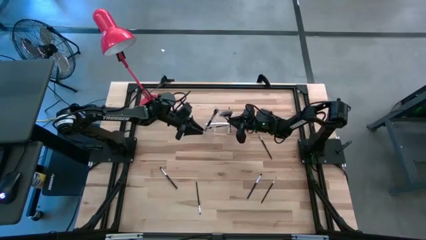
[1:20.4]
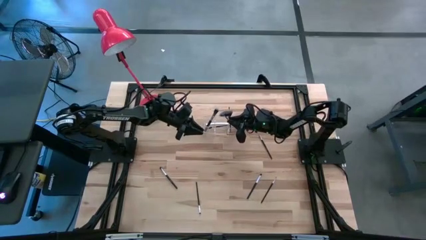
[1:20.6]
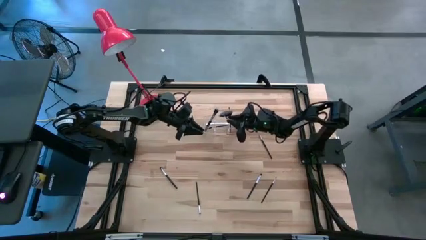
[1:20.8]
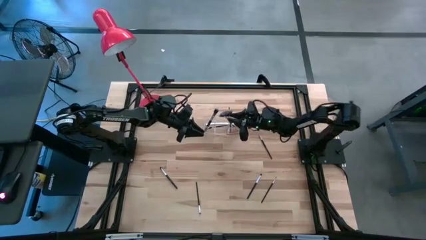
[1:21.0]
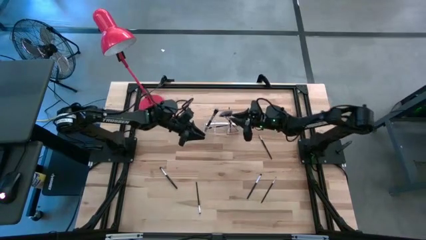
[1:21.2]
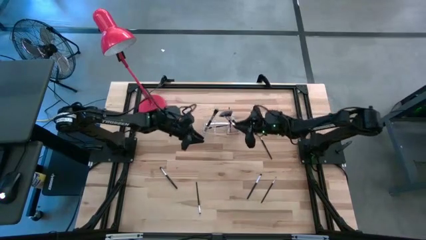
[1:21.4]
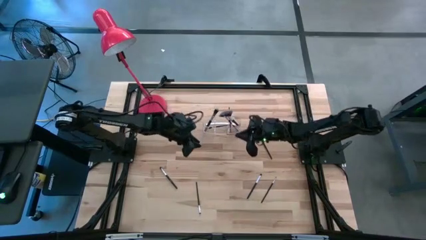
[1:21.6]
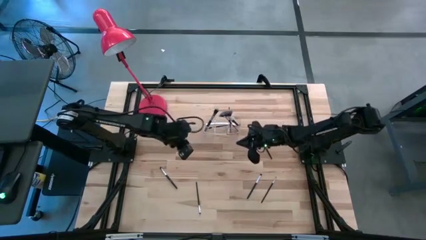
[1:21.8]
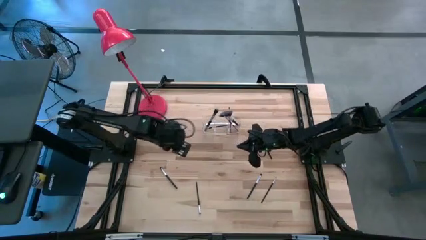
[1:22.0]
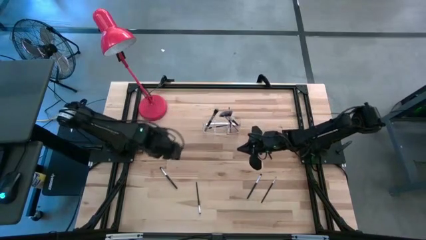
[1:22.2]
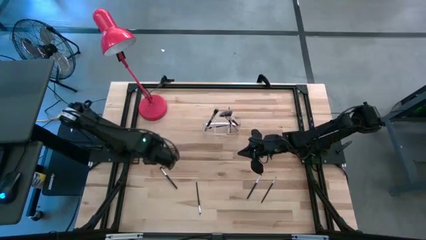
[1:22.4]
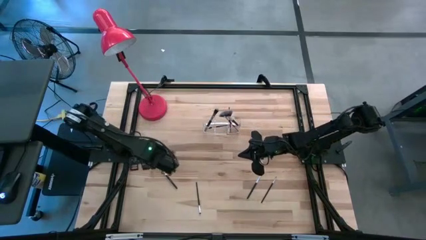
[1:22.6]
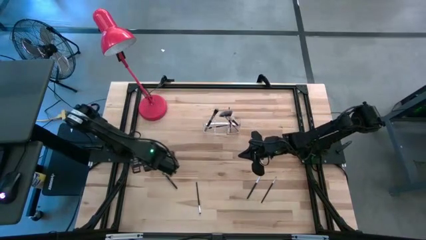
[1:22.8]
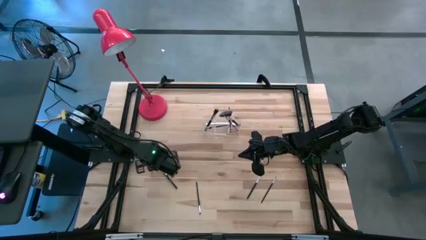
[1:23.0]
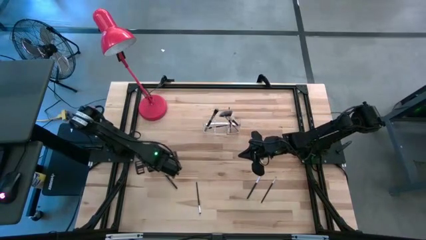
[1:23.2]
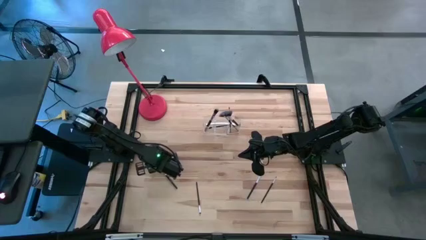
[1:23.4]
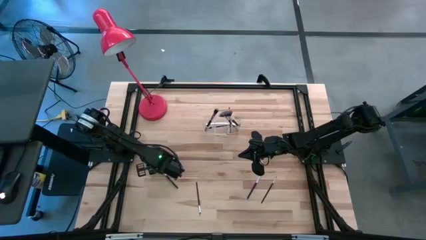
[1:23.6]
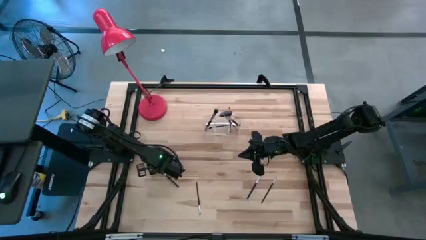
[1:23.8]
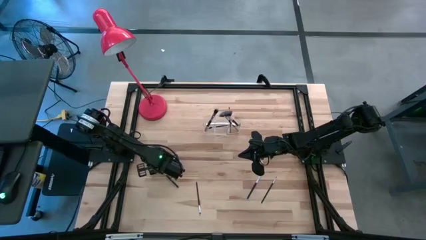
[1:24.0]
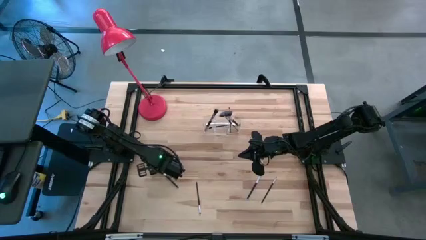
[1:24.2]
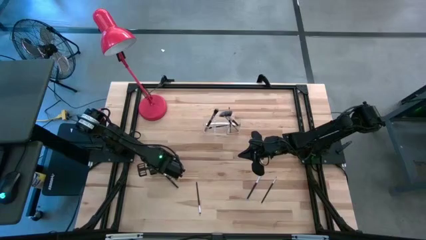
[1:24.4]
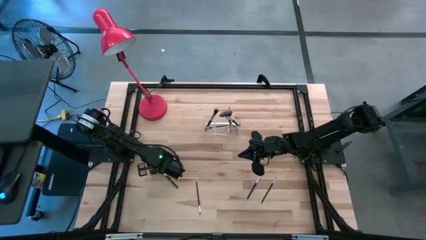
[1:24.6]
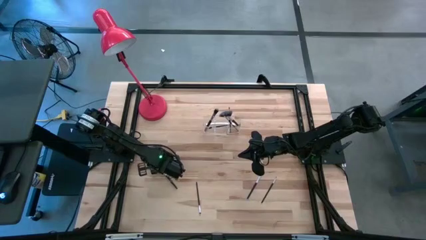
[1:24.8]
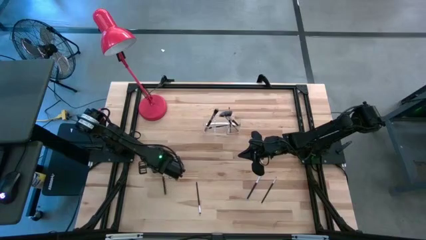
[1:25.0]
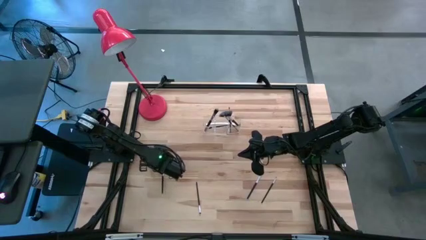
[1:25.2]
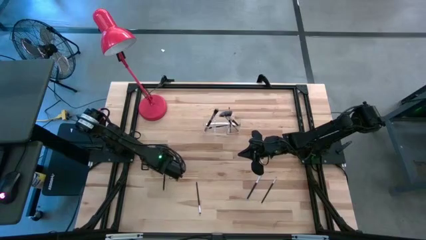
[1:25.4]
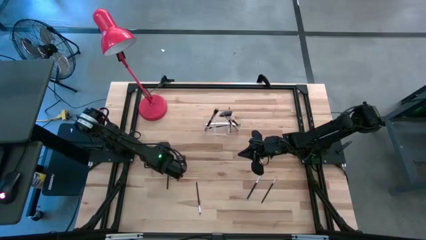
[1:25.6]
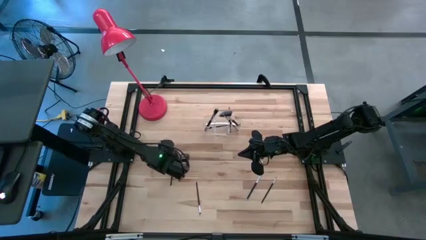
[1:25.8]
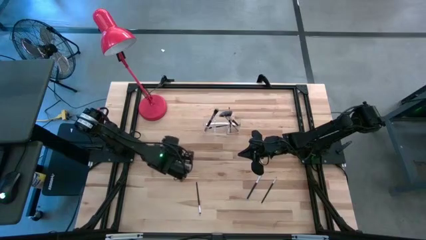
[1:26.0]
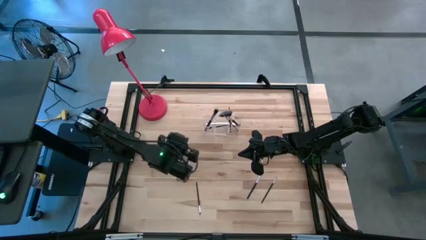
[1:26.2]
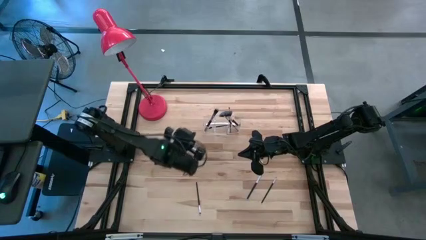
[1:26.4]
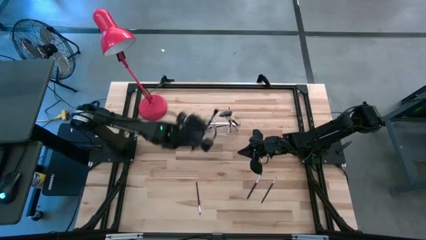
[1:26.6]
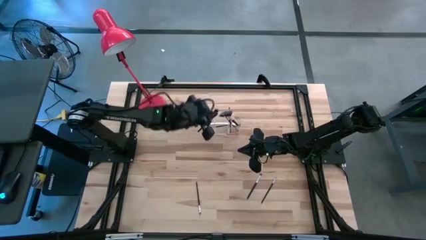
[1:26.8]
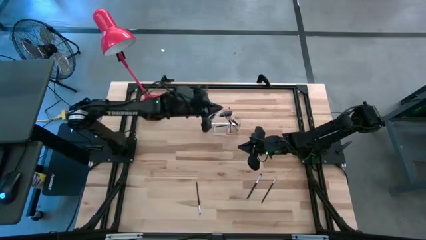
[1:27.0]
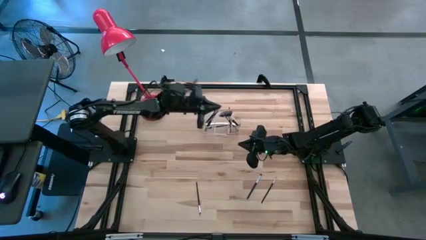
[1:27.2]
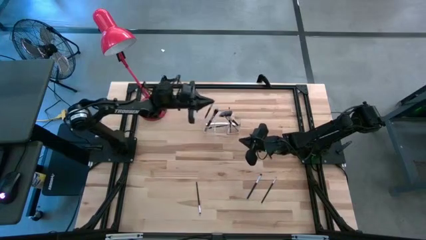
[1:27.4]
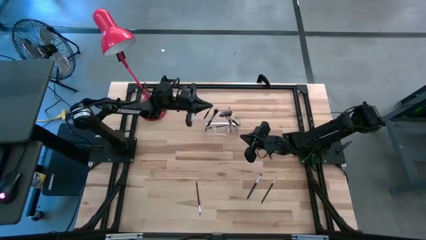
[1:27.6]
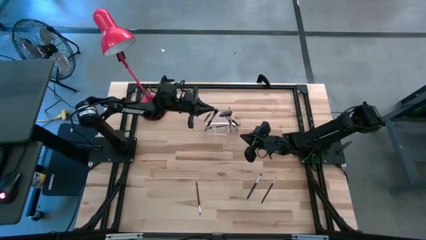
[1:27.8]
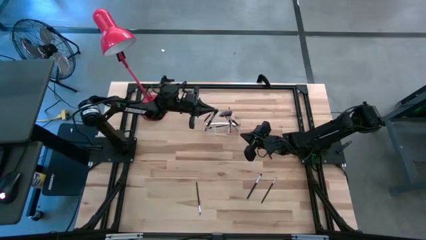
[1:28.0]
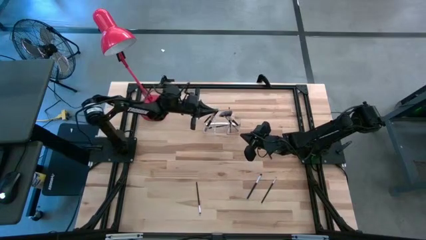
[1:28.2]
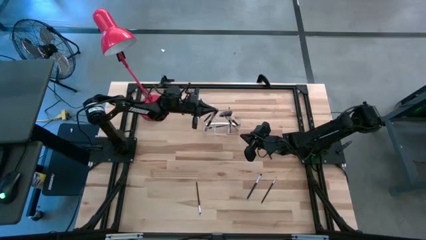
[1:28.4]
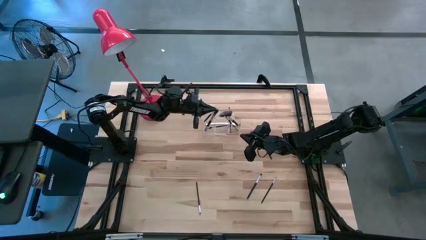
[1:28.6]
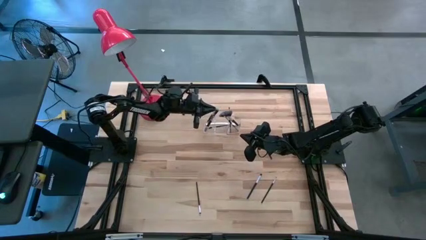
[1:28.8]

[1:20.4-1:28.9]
Task: Pick & Place Makeup Supplies
Put the makeup brush into the transparent organizer

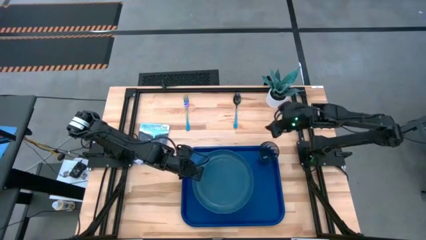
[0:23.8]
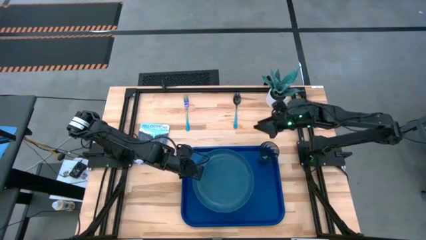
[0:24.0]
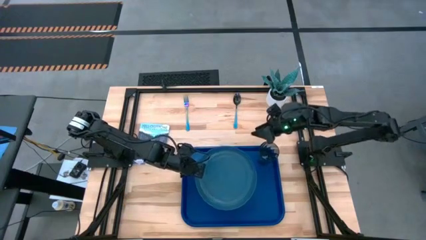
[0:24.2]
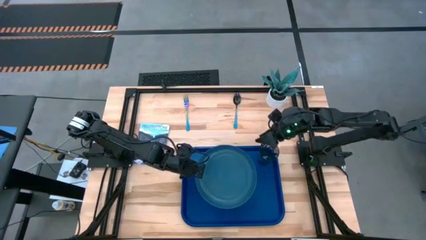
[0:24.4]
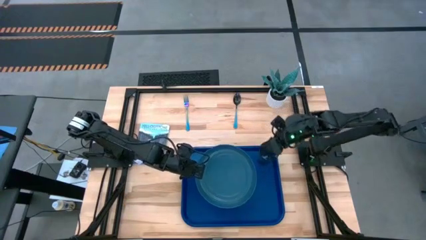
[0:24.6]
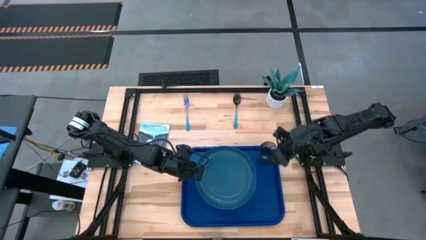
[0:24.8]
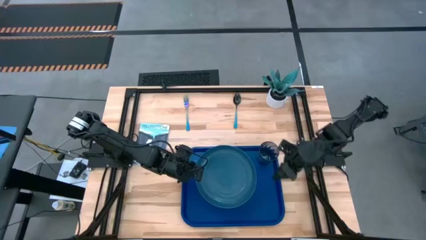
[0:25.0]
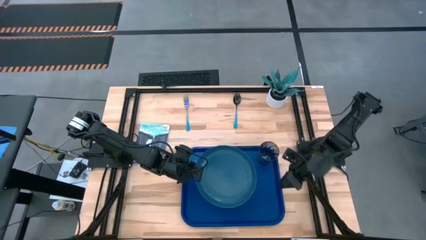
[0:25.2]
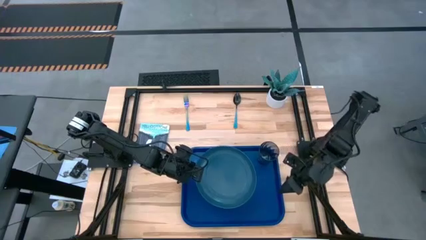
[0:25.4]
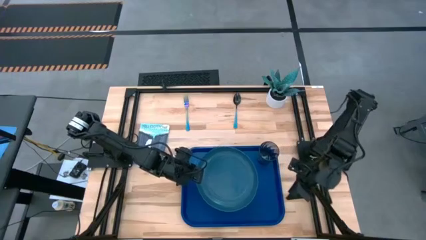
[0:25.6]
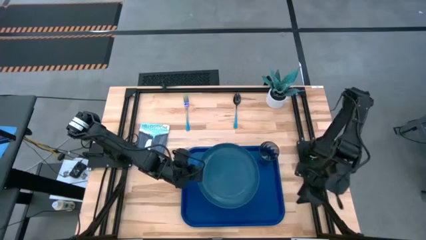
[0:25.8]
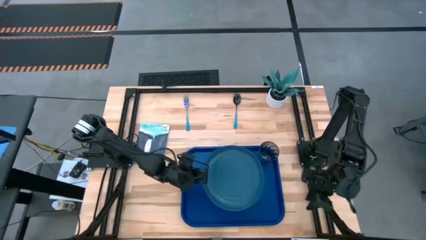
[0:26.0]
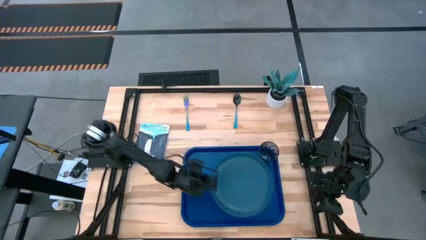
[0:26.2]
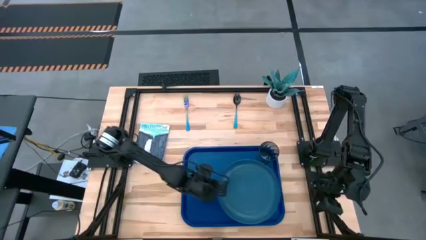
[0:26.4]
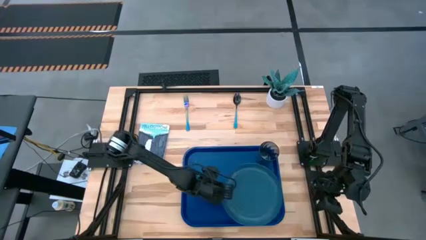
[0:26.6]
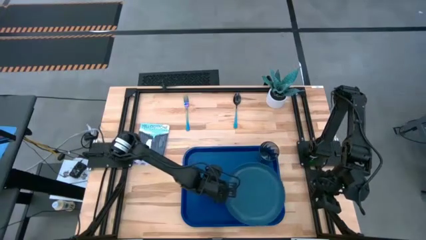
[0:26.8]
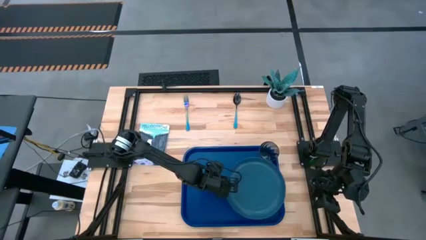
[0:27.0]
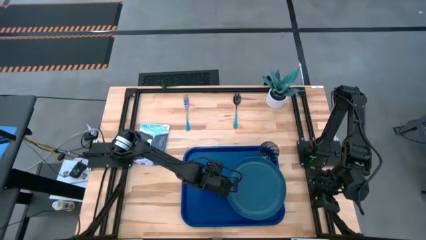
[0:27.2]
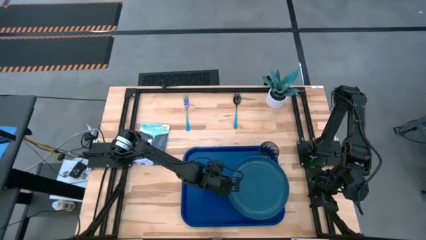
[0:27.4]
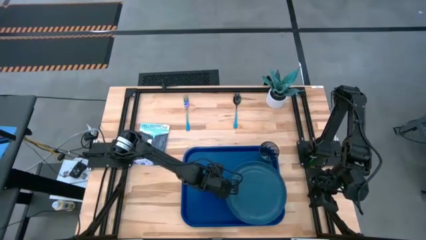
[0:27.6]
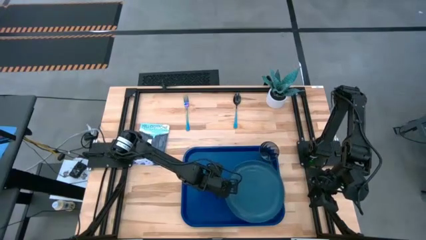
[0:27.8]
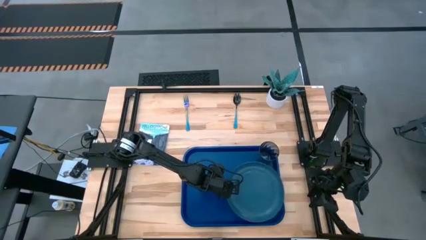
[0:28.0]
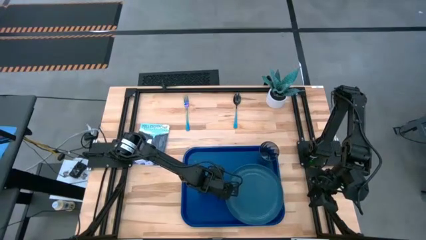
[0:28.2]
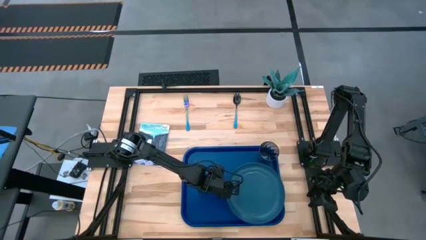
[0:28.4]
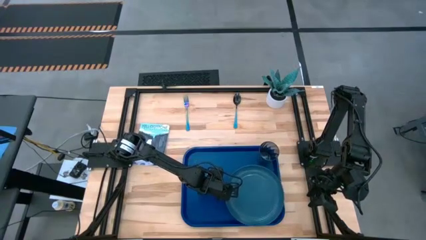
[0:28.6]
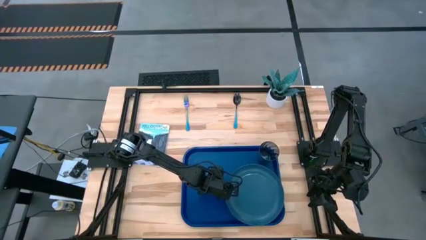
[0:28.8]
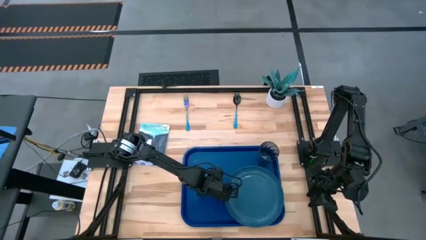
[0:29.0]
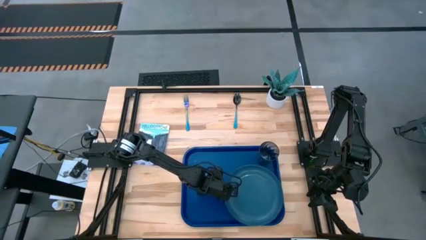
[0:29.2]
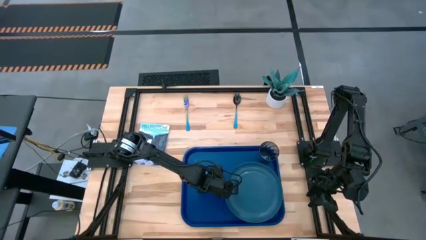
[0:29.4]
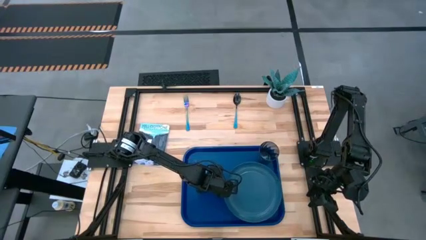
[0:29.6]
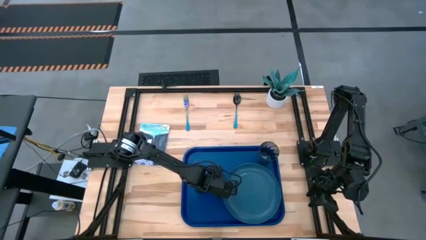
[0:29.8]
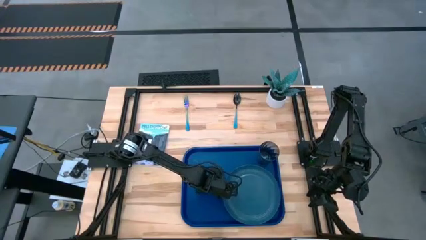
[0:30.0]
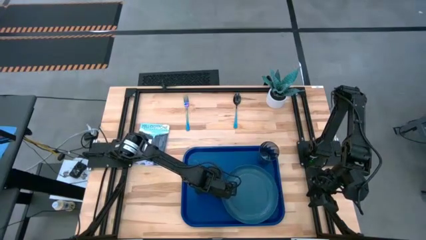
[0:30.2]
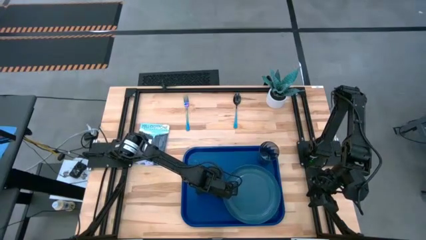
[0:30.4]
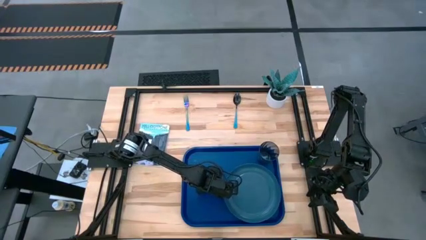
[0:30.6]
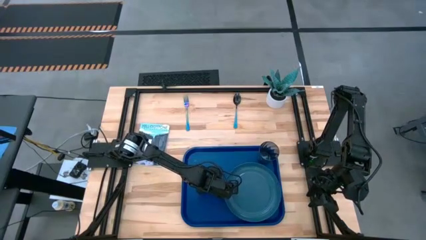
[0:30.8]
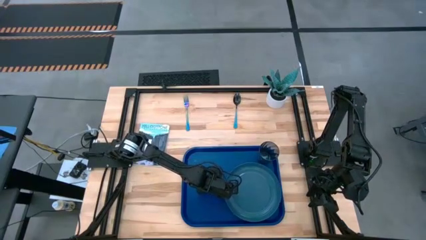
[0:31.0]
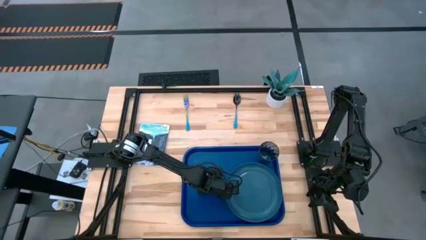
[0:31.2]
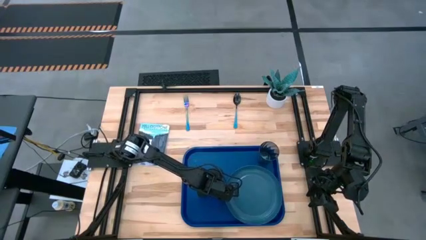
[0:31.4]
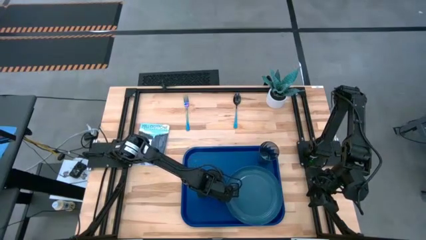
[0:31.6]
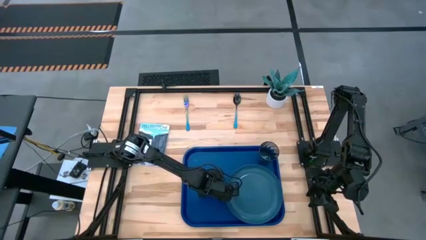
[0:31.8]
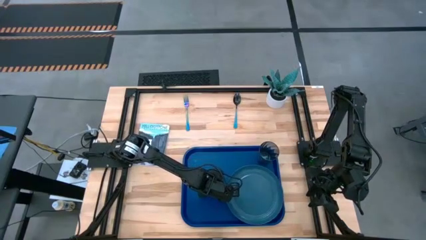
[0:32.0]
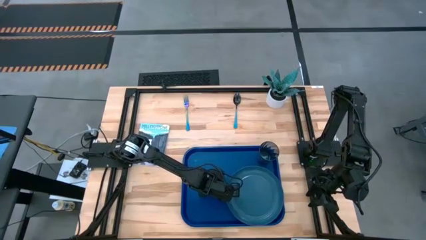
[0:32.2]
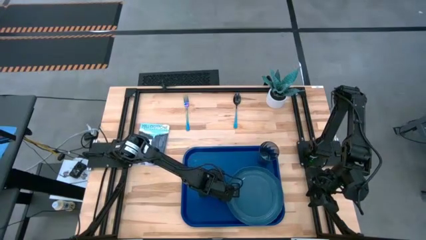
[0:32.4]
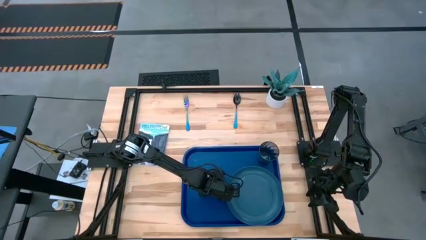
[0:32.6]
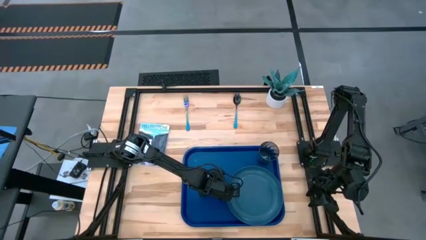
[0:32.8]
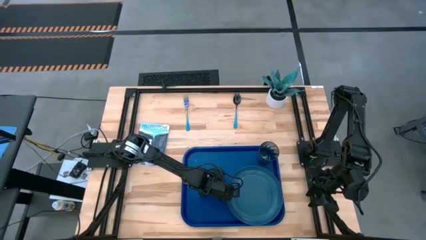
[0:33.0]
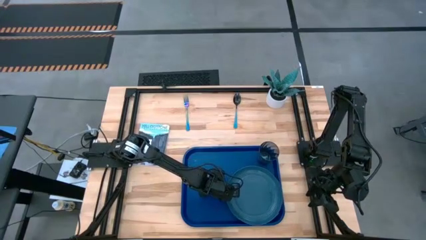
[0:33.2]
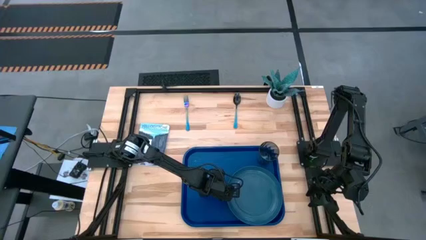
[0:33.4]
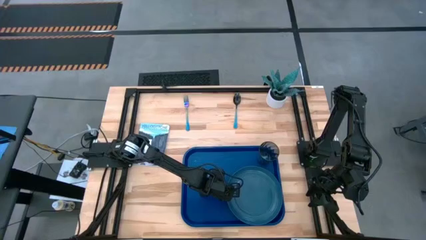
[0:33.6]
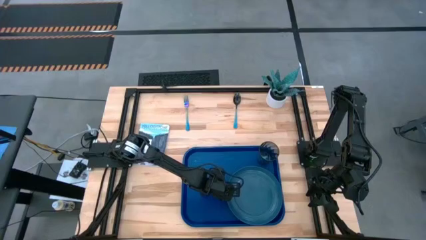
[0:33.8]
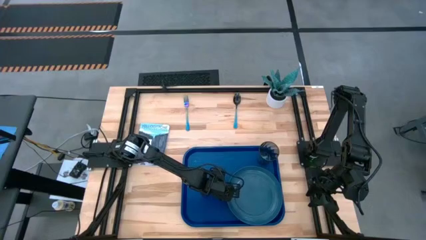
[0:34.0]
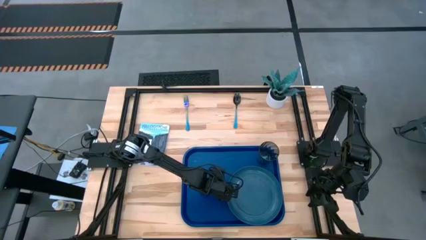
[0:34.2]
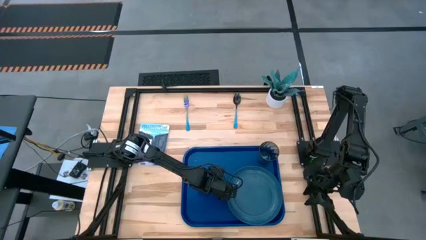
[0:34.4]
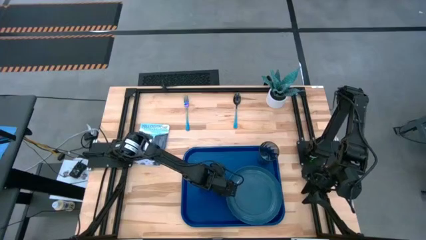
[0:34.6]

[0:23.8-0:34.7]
Task: Pick and place plate/cup/fork/spoon on tray
Put the blue plate on the bottom right of the blue tray
